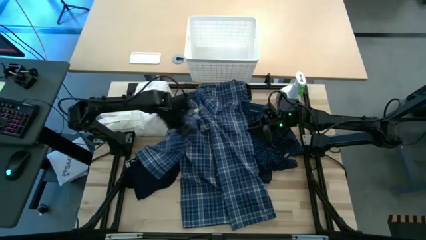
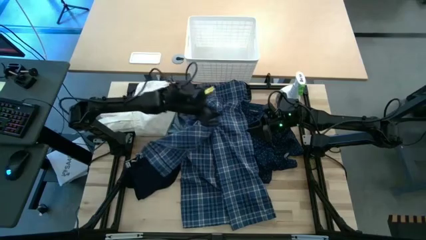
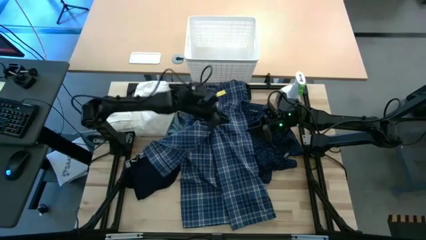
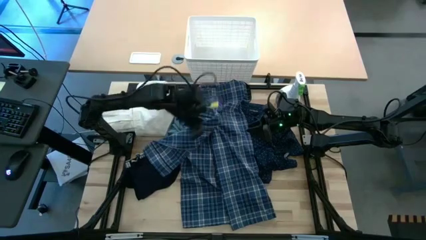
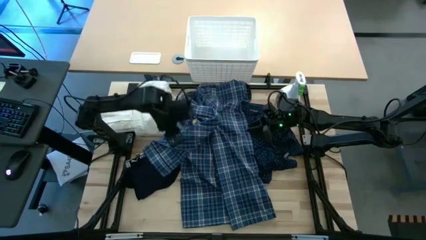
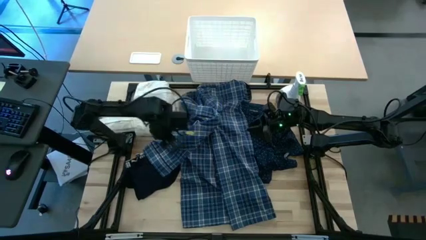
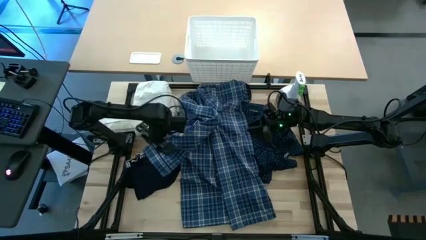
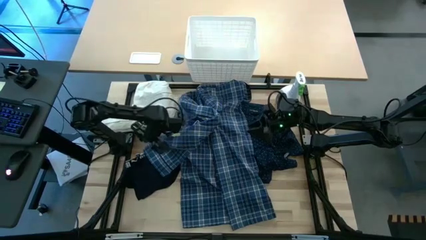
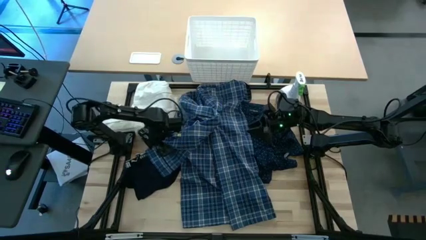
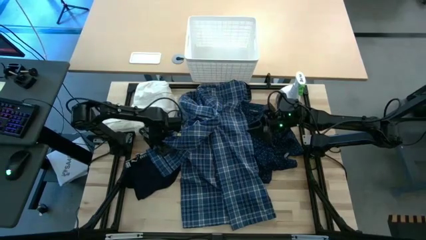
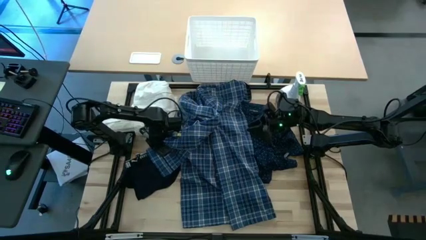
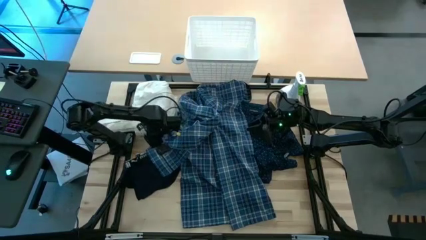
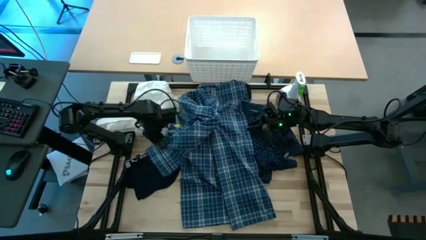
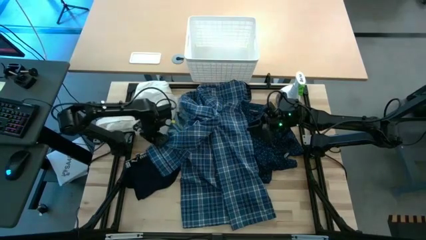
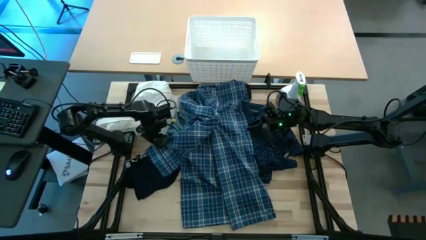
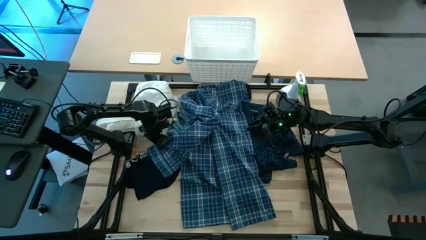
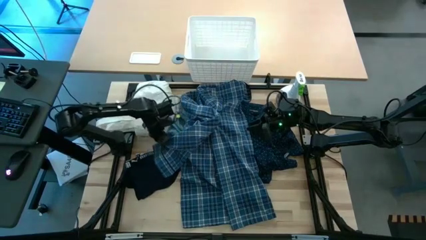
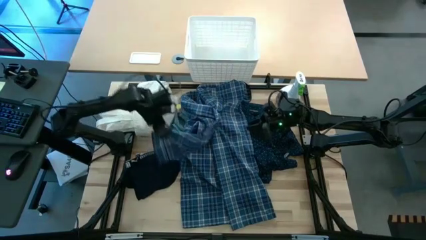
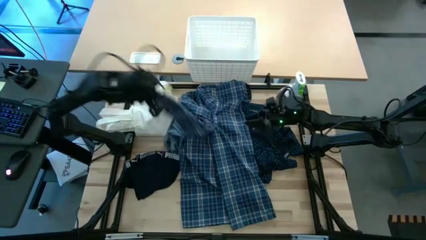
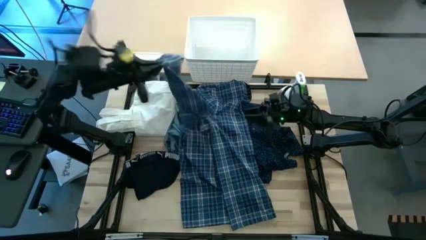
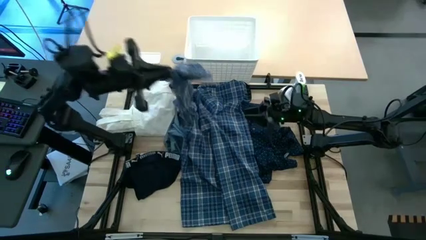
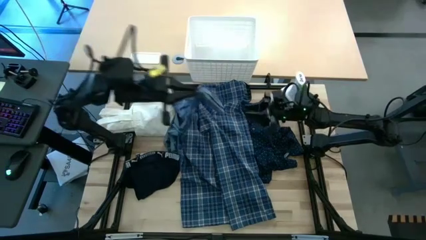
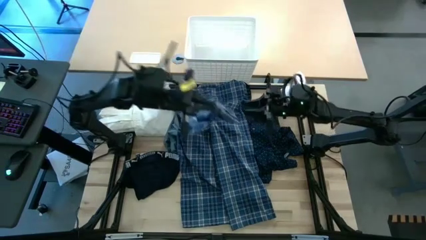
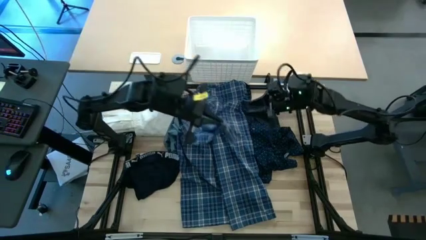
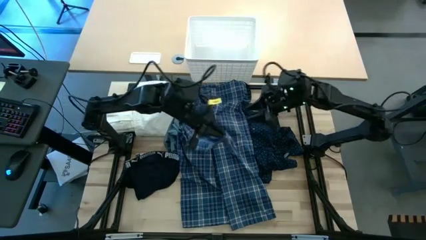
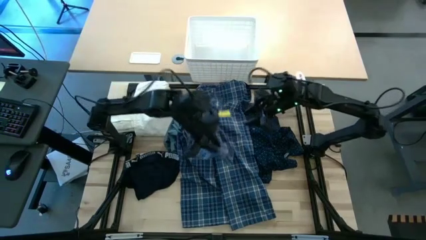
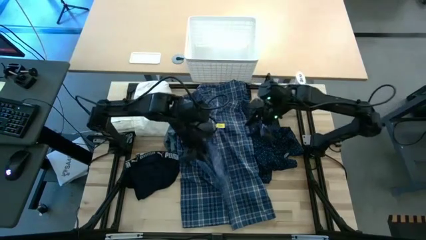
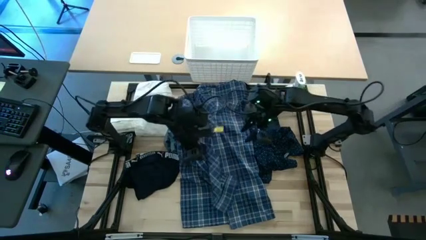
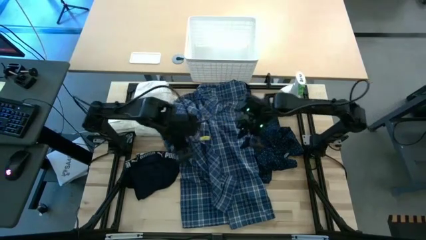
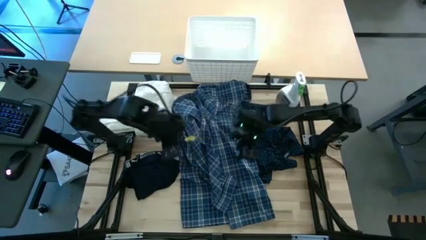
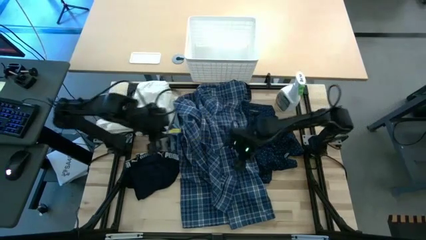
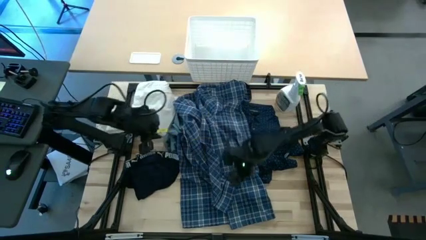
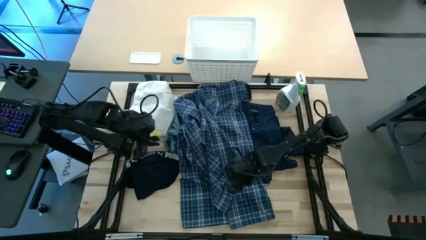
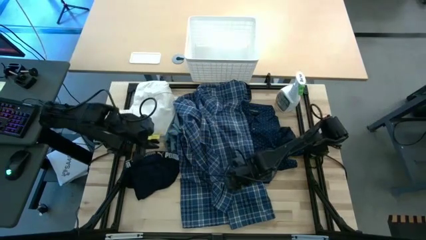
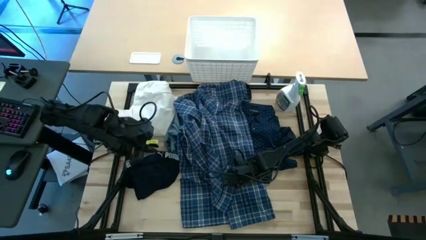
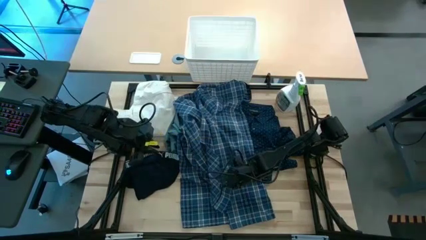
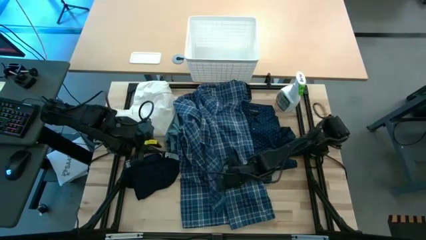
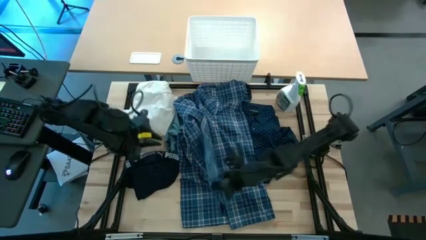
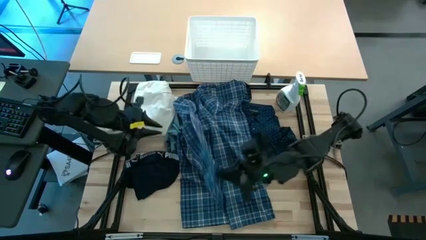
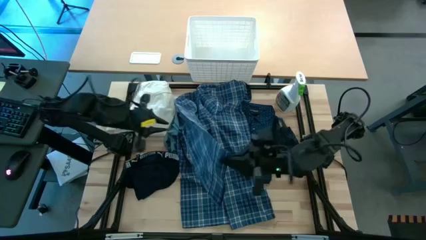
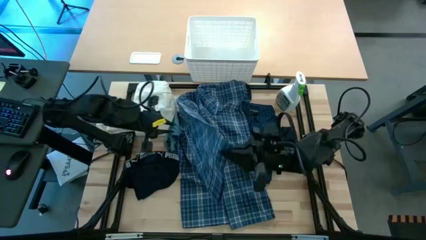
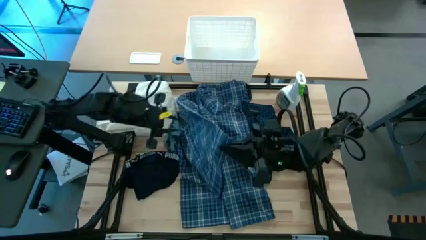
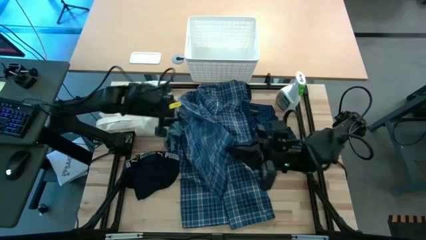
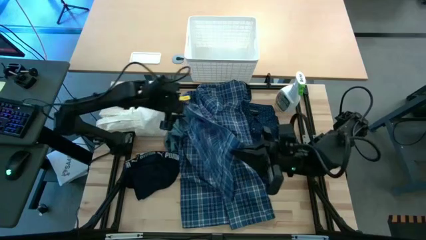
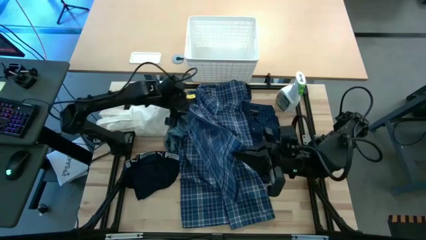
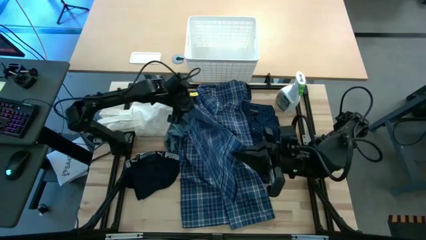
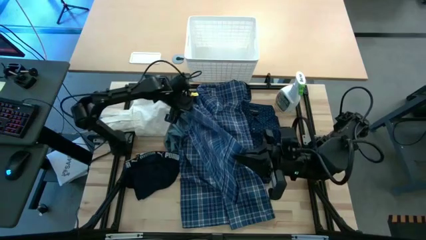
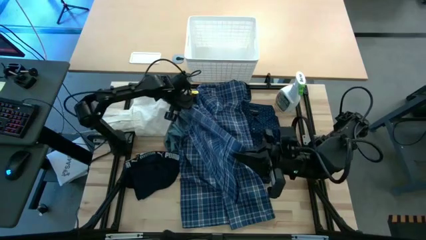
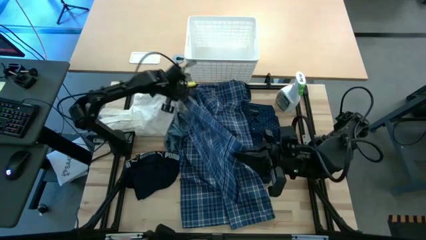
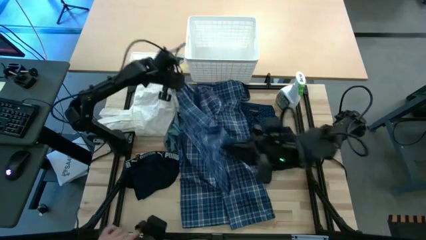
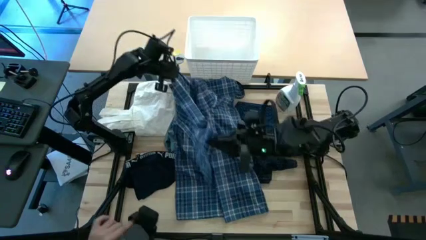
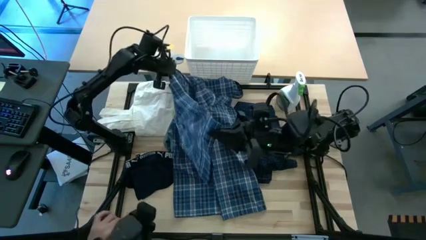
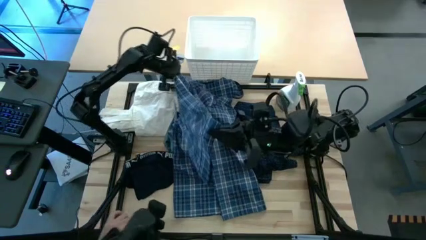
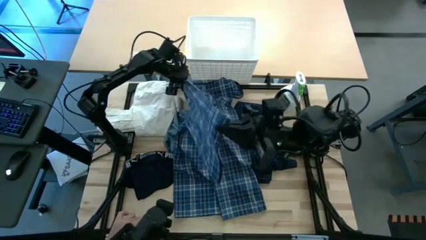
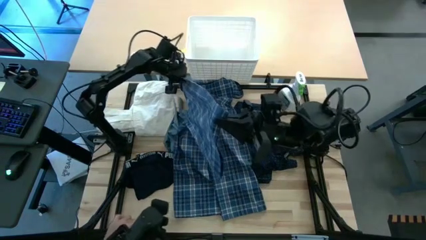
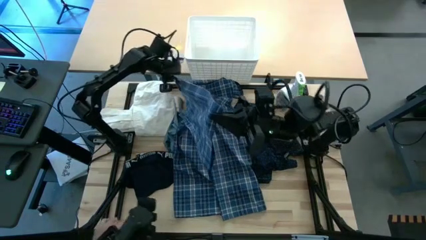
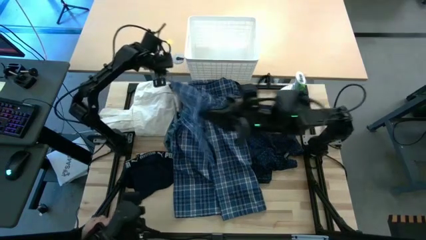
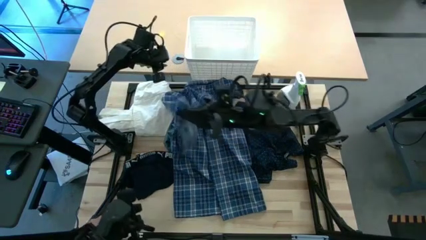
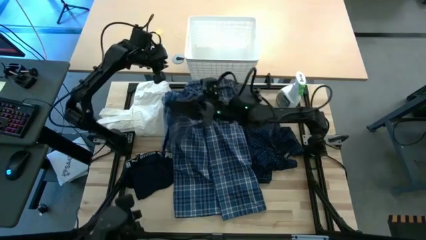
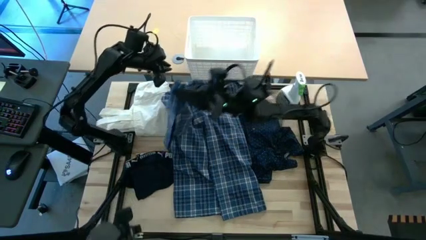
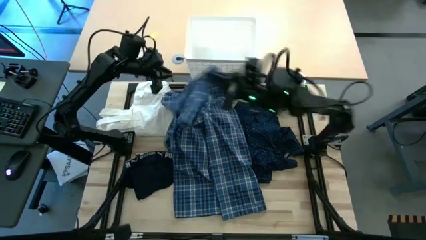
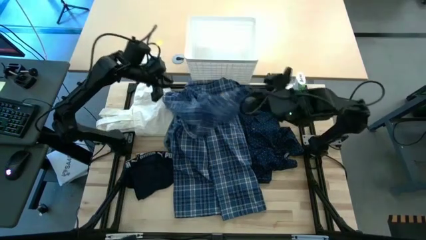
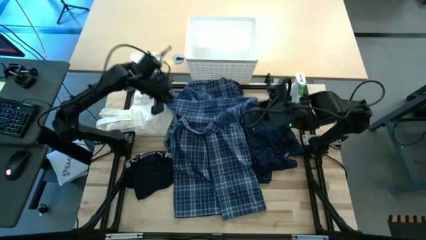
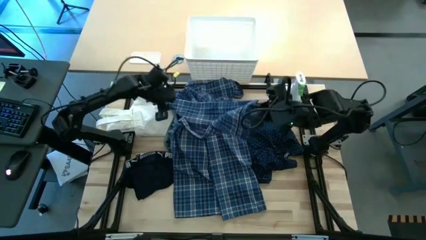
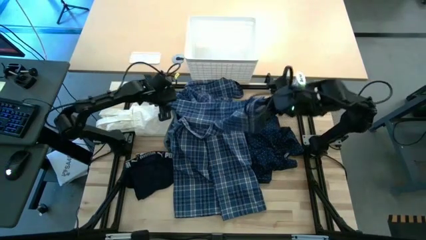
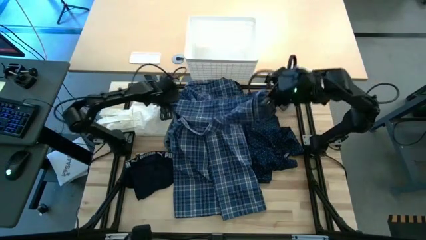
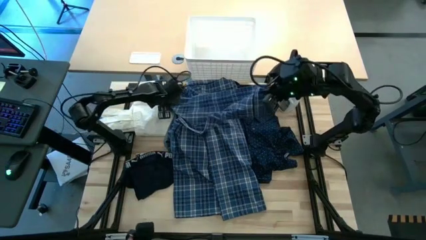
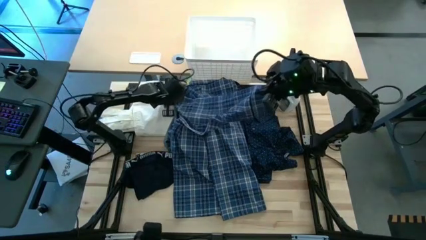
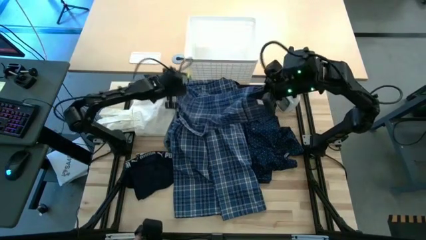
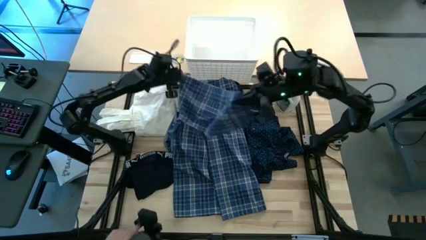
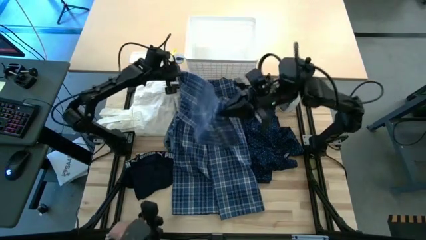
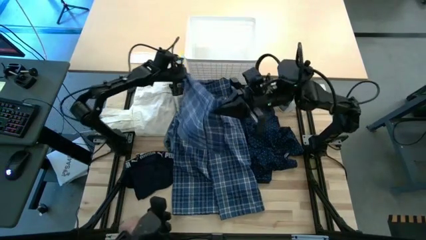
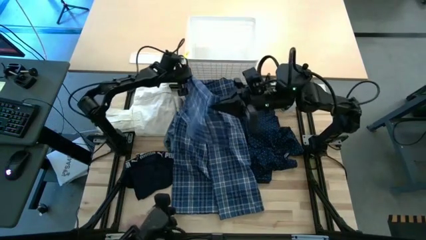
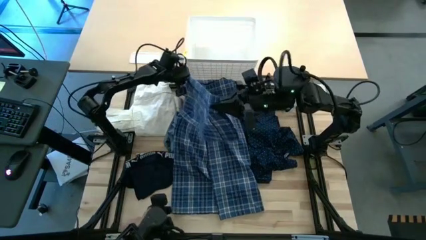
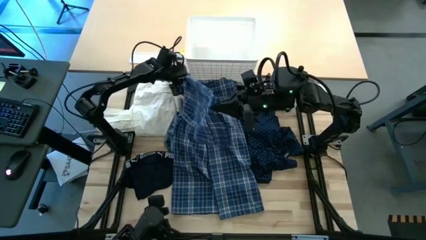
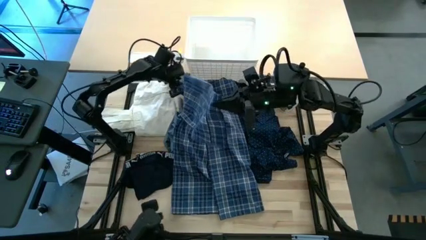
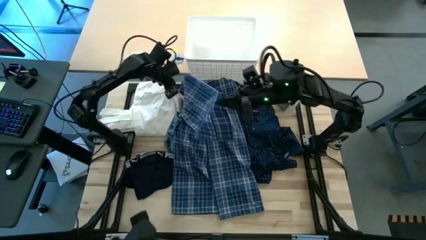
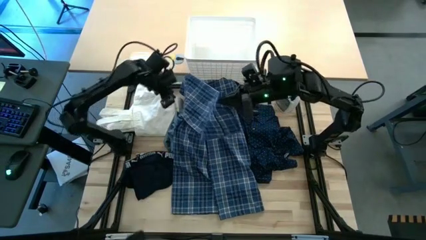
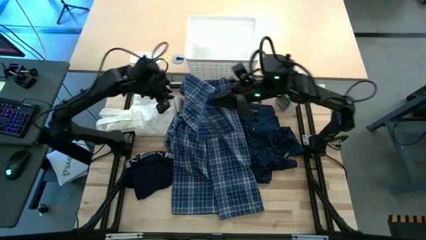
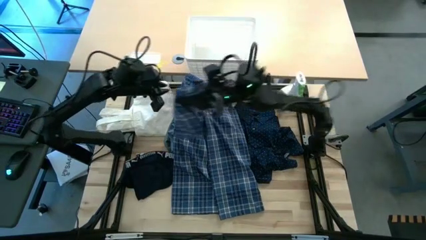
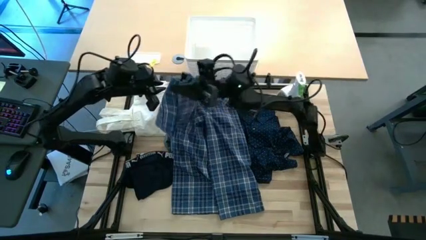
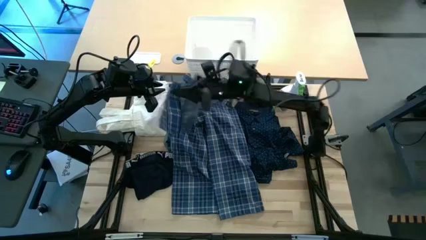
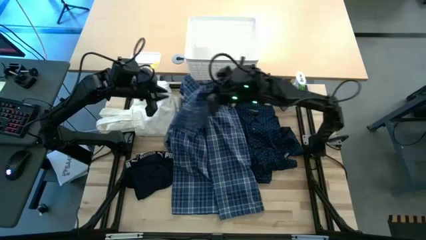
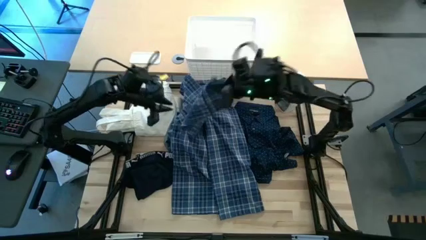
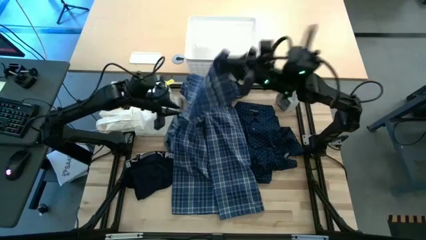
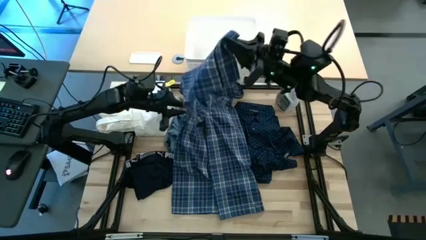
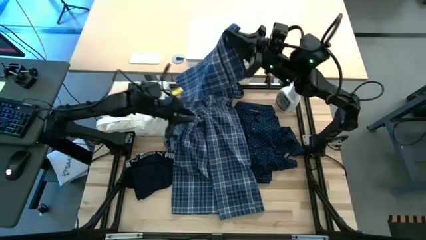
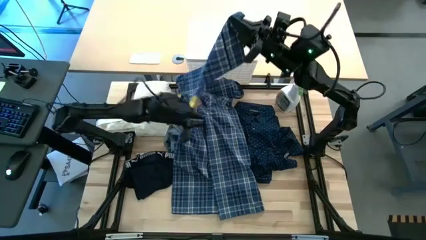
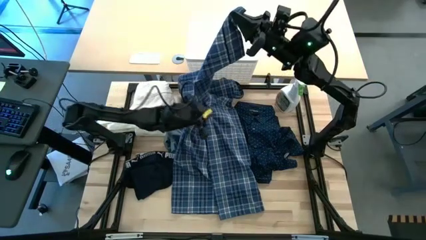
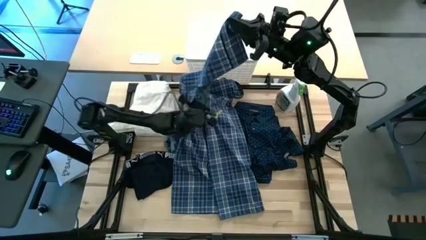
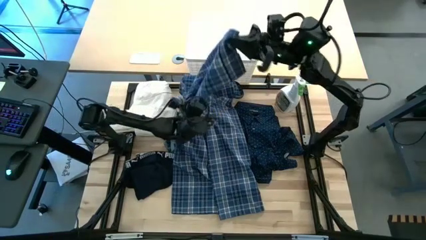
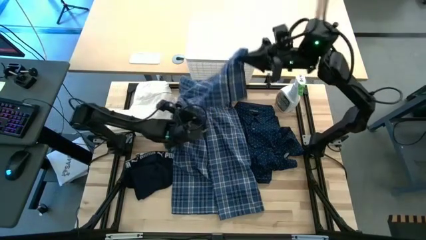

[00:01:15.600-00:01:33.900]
Fold the checkered blue polo
